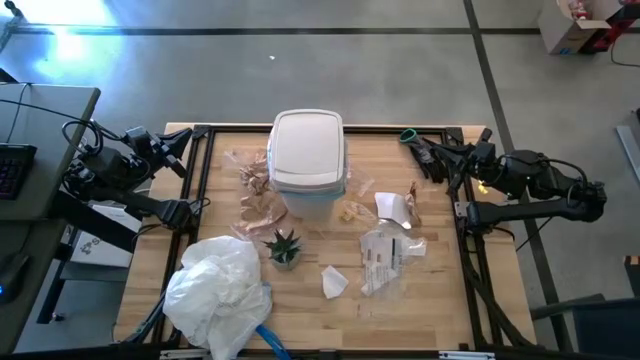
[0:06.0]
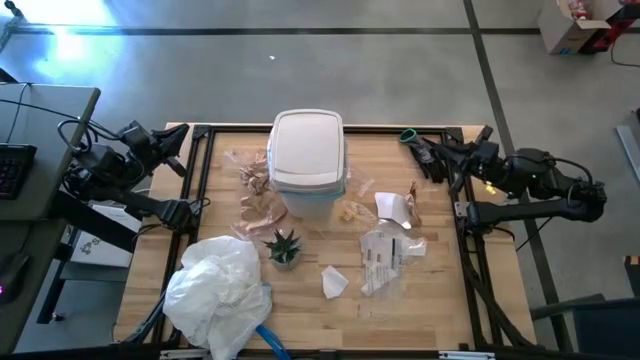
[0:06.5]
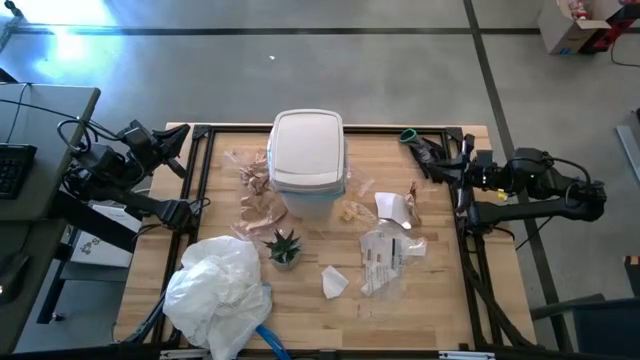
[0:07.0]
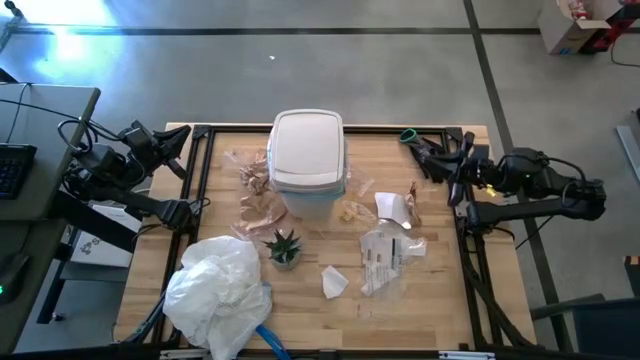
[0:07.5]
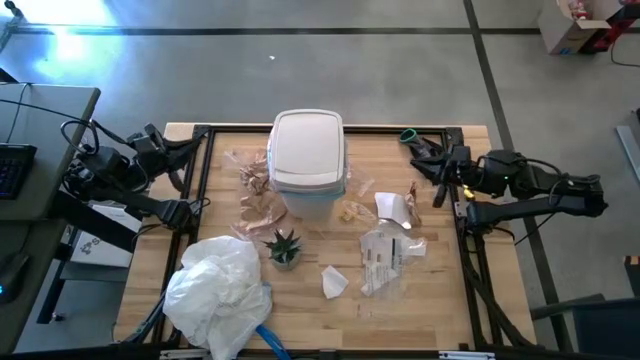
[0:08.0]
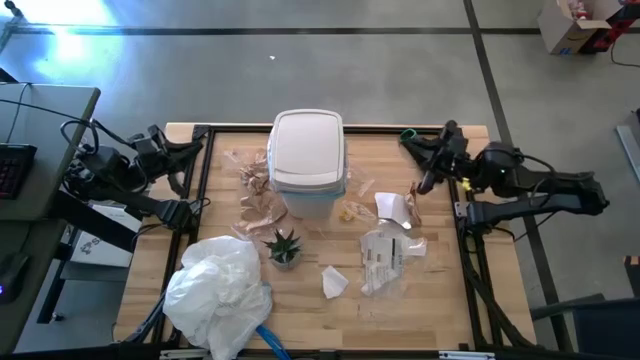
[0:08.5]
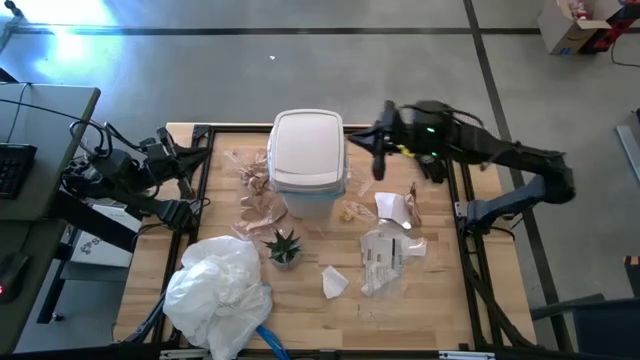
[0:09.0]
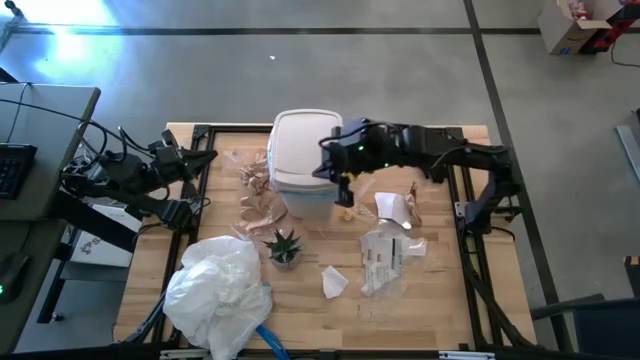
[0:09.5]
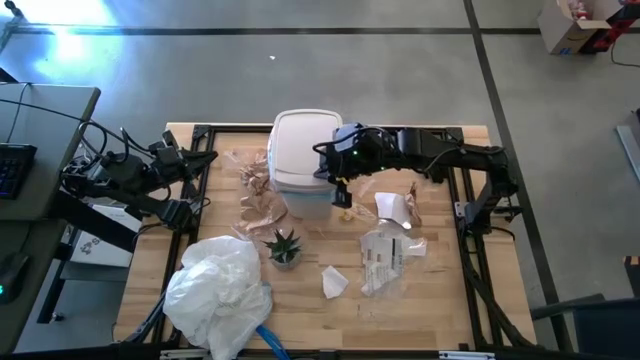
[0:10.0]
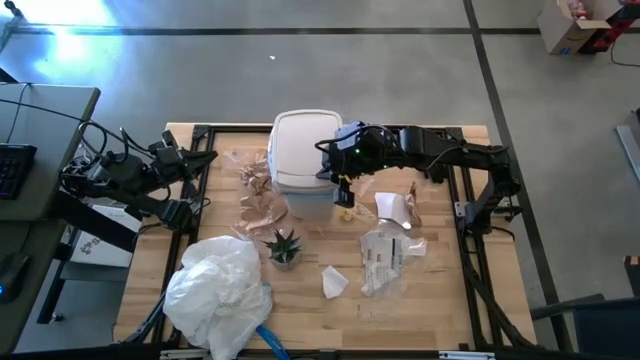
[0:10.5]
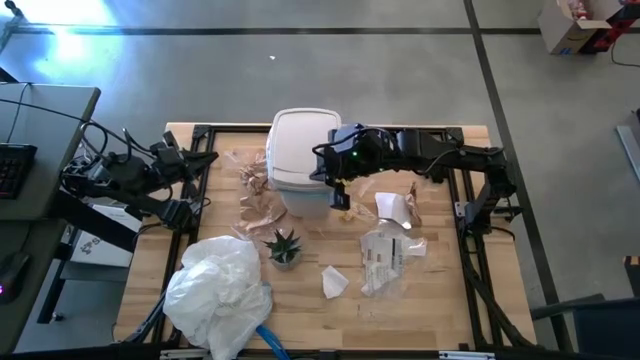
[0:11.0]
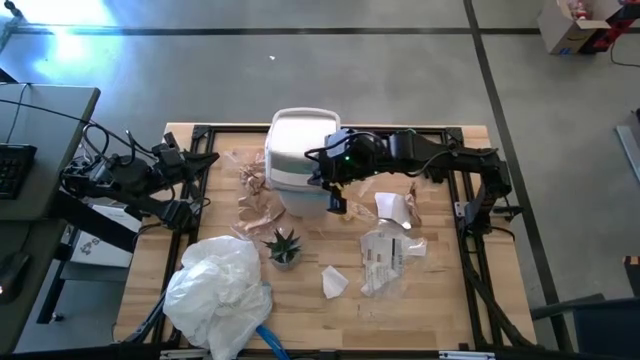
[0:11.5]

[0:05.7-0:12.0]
Task: place trash/remove bag and relplace
Open the trash bin lid

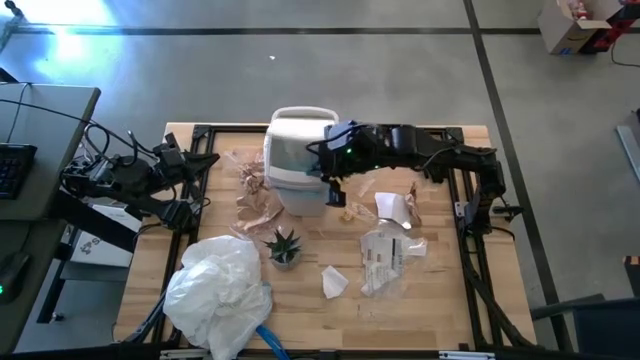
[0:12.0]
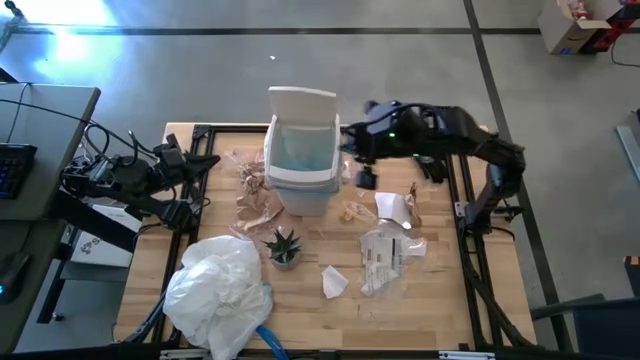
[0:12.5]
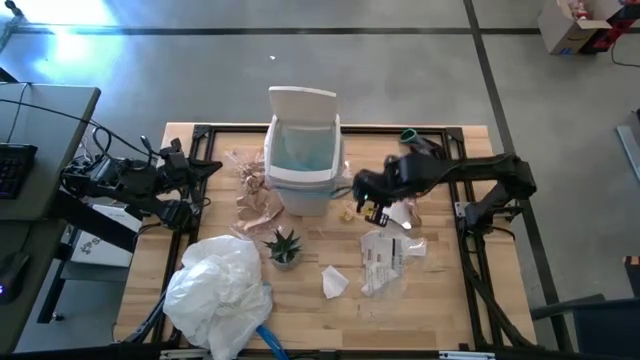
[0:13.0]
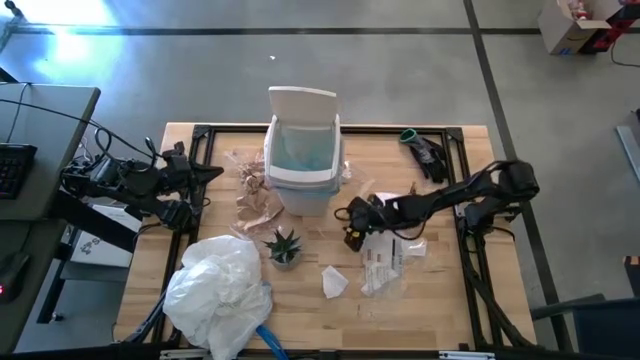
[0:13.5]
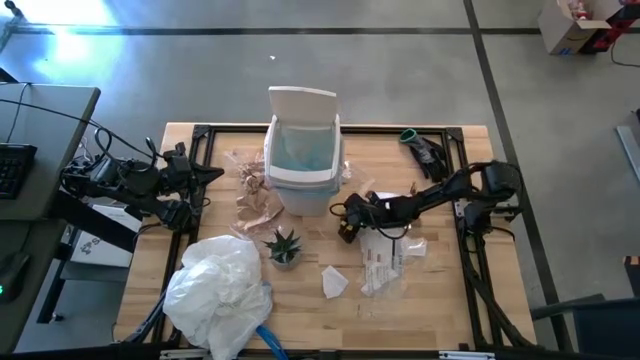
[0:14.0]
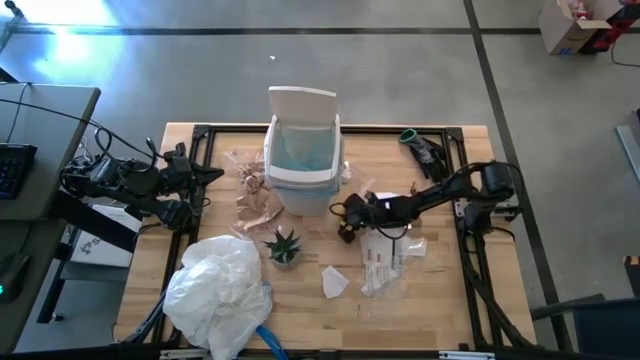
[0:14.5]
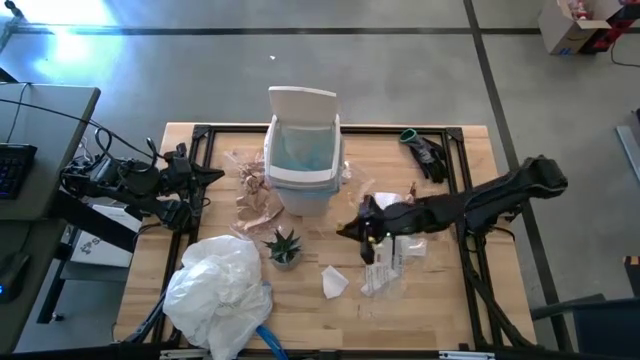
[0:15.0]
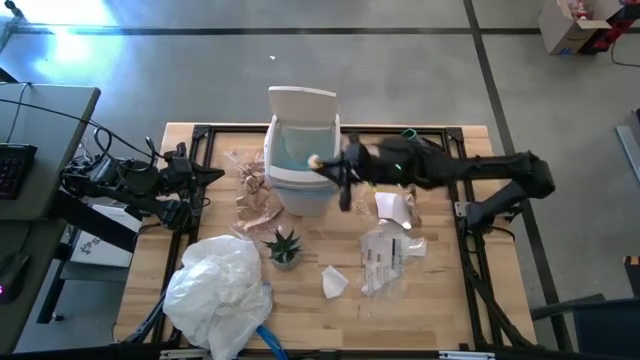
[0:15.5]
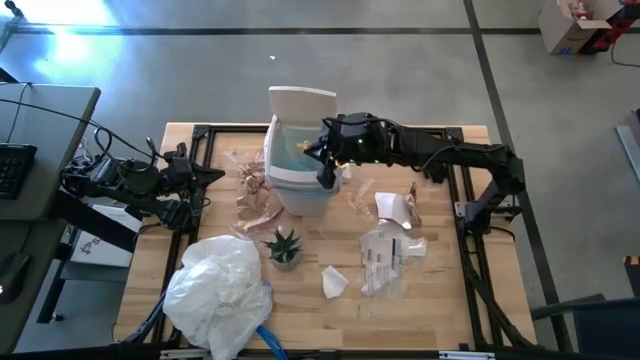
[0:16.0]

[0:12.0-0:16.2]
Put the yellow plastic wrapper into the trash bin

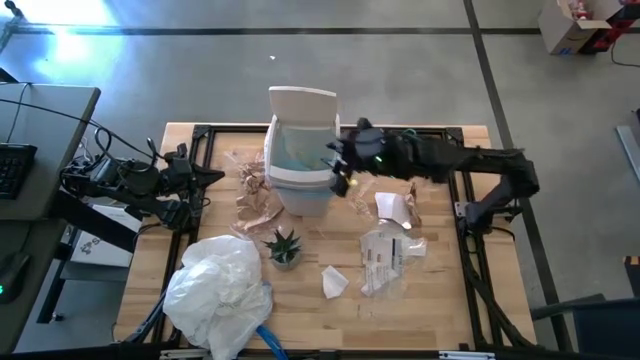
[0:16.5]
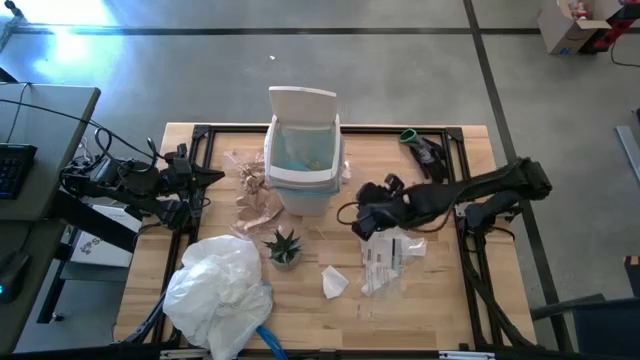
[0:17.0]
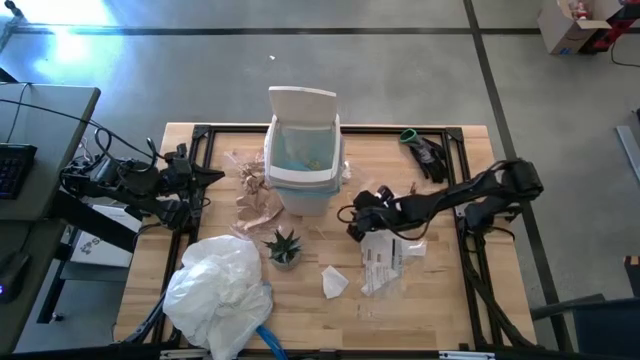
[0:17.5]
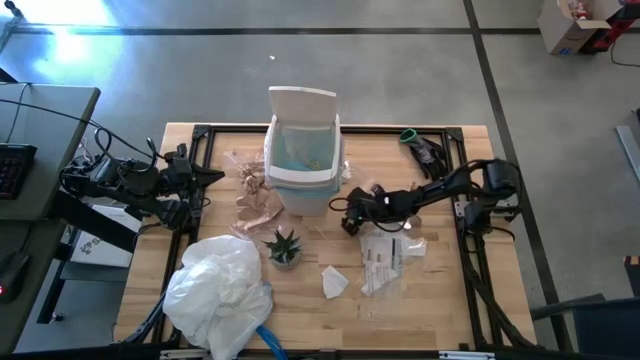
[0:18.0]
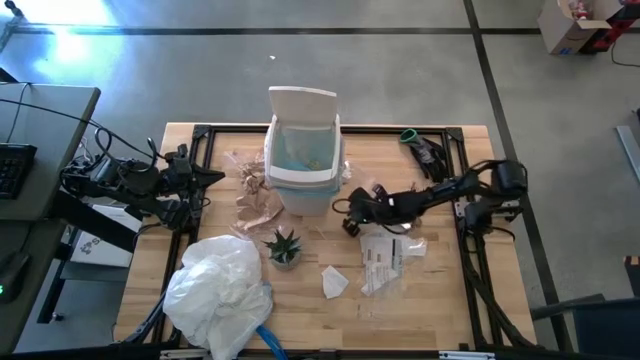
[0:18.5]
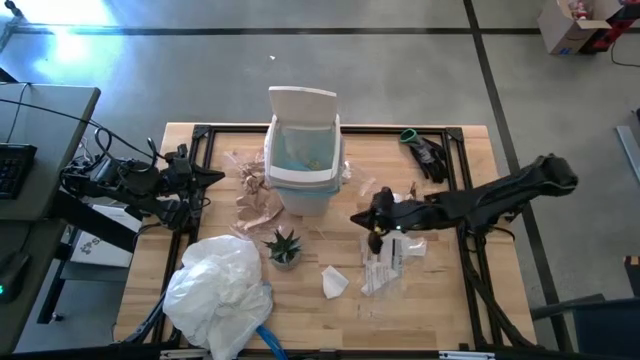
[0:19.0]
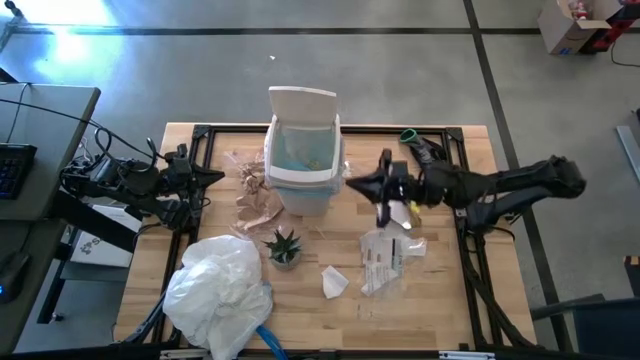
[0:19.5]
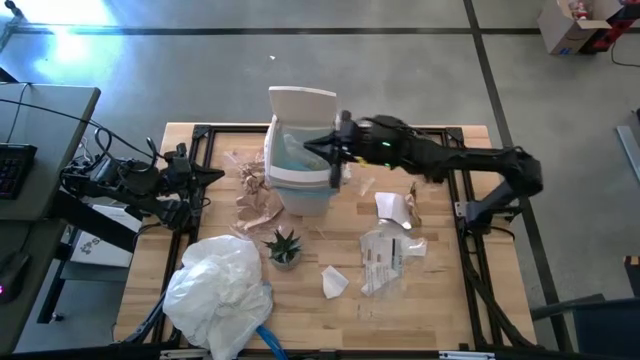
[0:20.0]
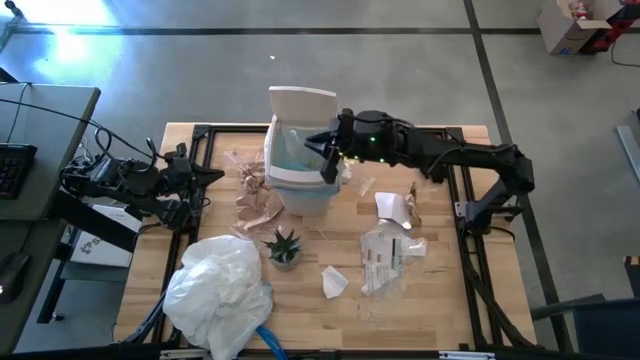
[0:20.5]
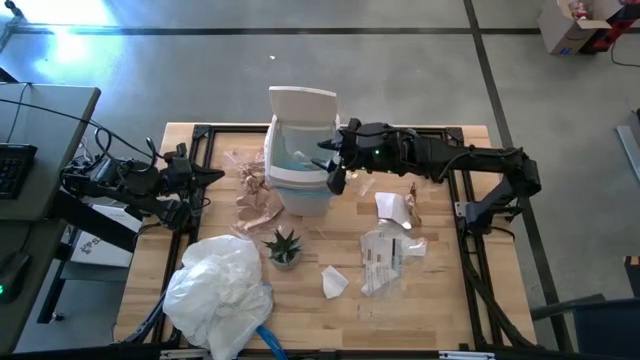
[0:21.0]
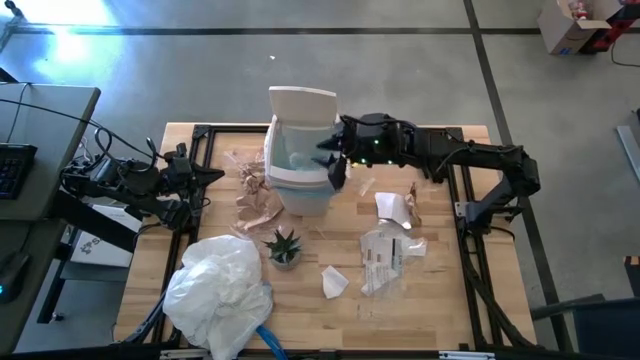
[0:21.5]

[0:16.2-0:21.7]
Put the transparent plastic into the trash bin

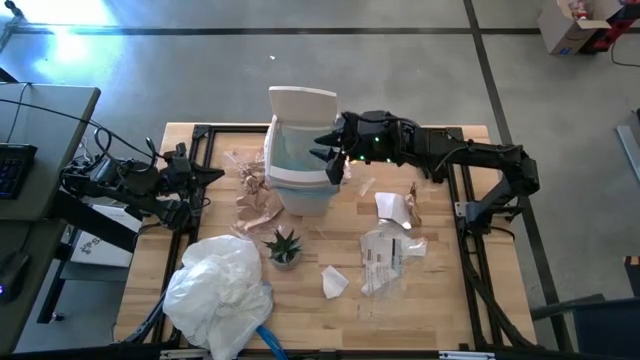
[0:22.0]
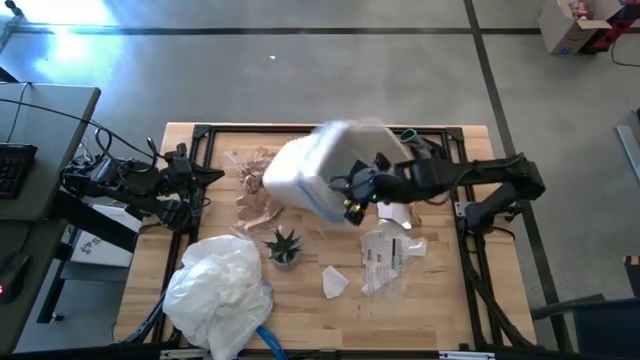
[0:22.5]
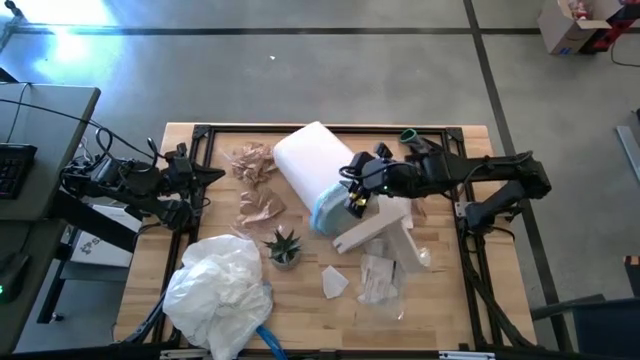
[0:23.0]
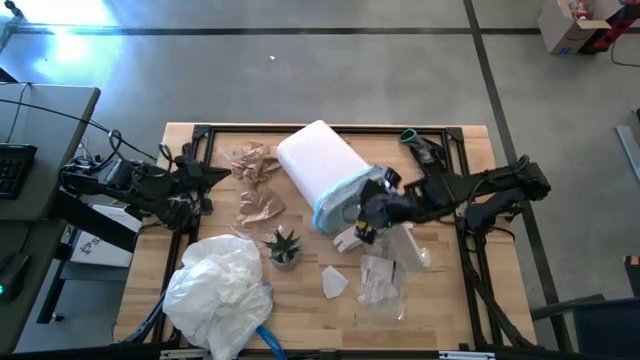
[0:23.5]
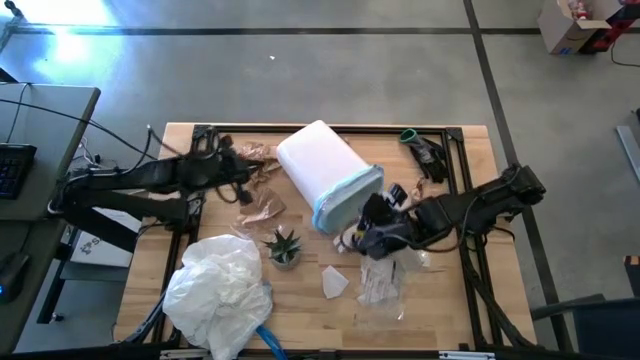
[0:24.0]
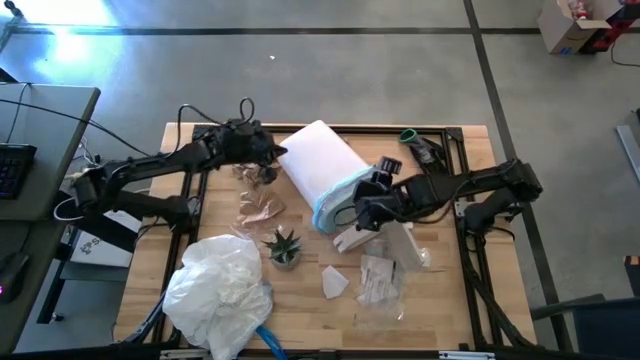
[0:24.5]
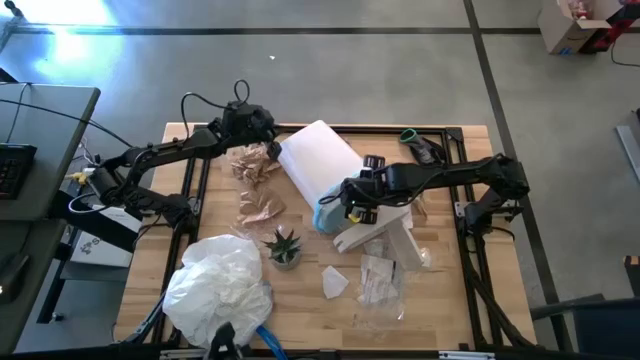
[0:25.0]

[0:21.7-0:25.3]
Adjust the trash bin
